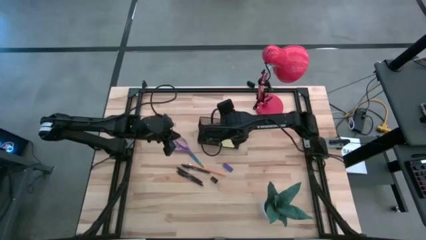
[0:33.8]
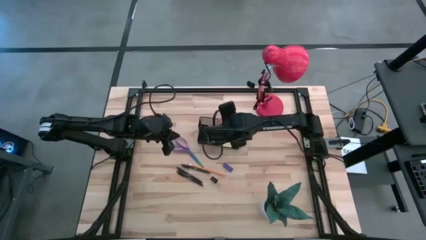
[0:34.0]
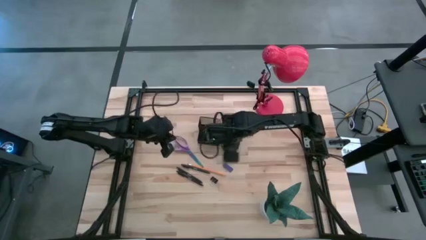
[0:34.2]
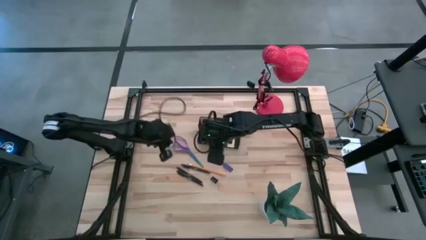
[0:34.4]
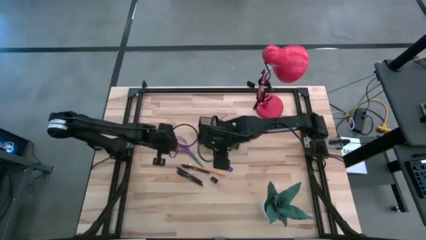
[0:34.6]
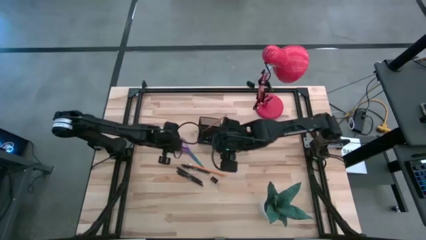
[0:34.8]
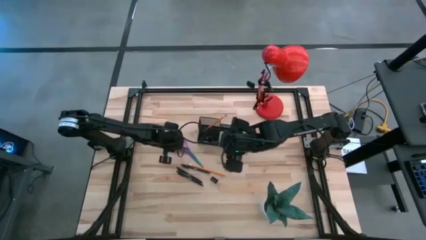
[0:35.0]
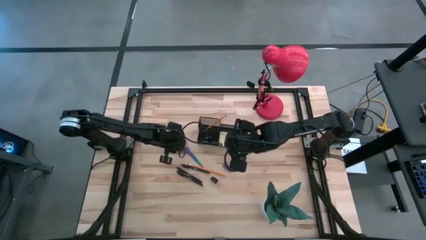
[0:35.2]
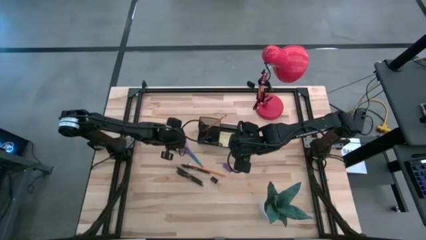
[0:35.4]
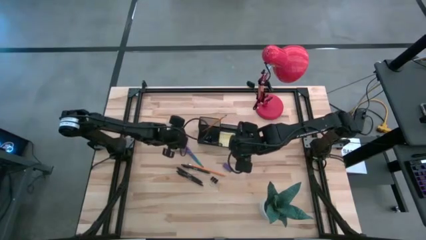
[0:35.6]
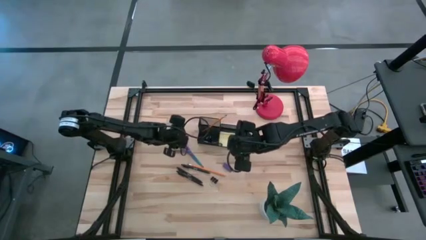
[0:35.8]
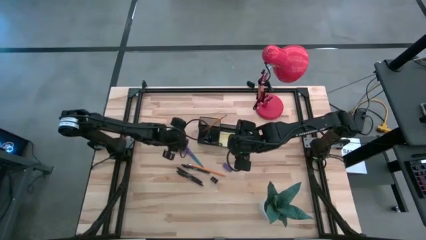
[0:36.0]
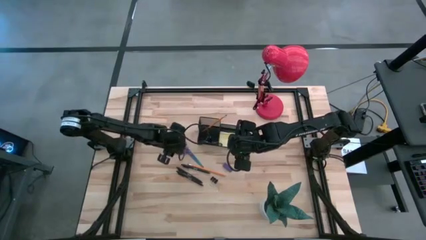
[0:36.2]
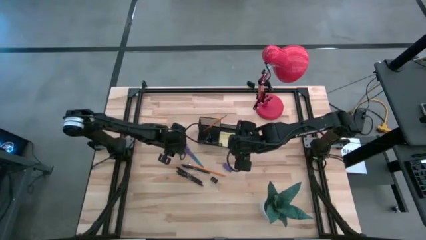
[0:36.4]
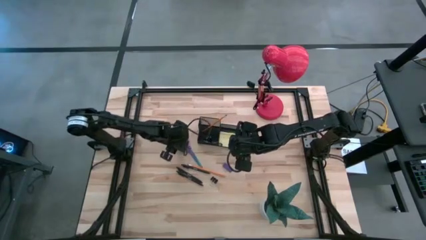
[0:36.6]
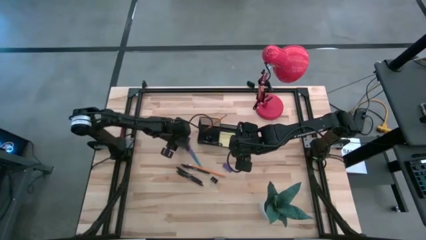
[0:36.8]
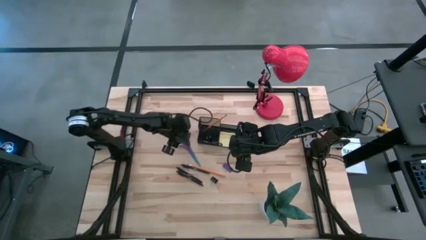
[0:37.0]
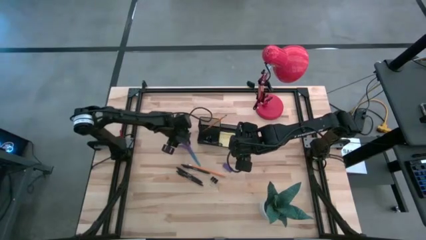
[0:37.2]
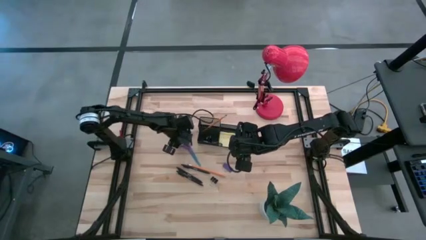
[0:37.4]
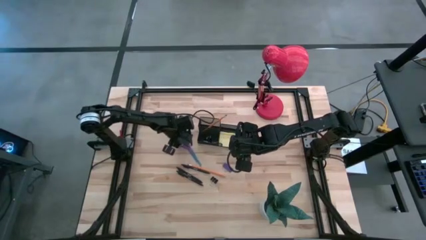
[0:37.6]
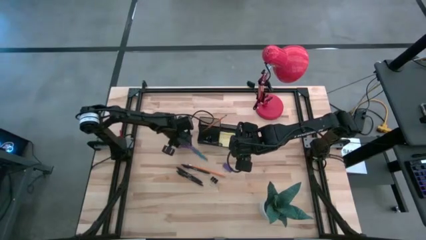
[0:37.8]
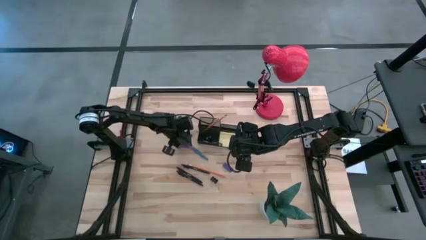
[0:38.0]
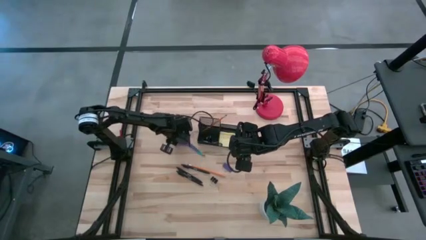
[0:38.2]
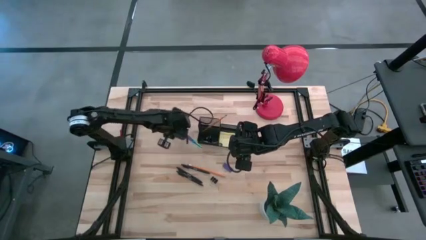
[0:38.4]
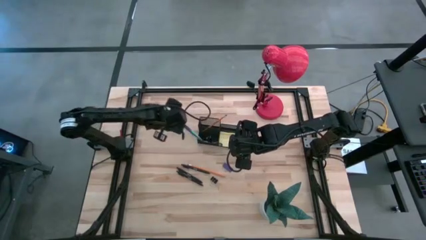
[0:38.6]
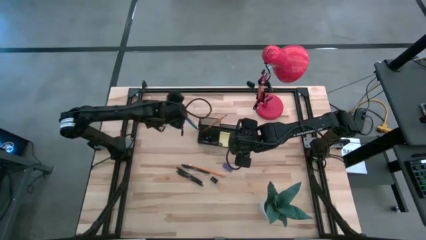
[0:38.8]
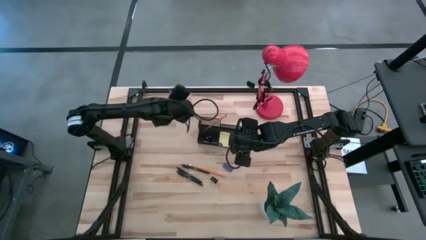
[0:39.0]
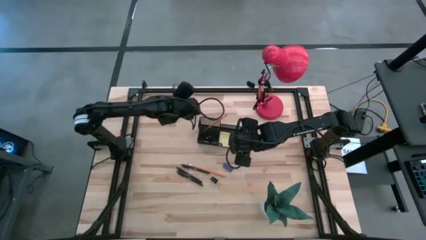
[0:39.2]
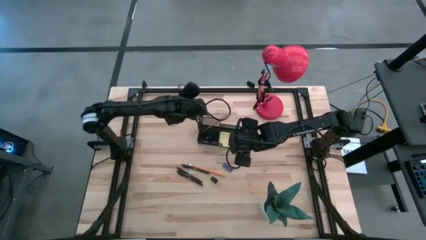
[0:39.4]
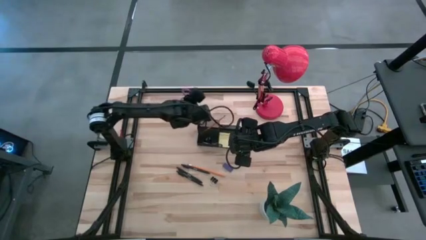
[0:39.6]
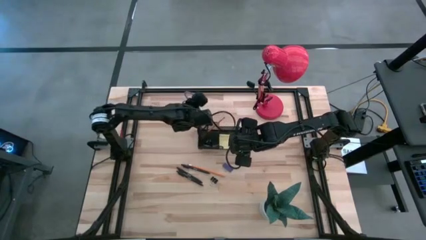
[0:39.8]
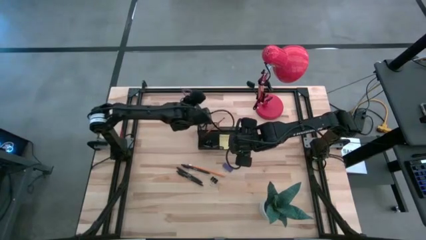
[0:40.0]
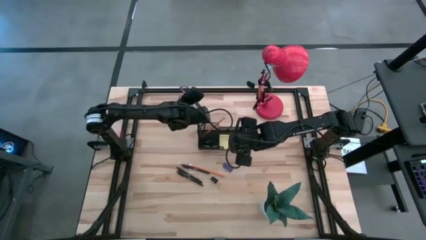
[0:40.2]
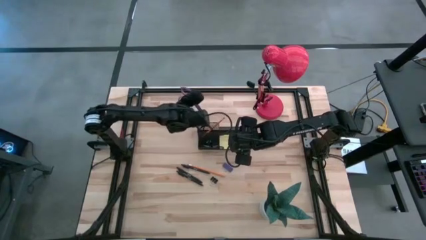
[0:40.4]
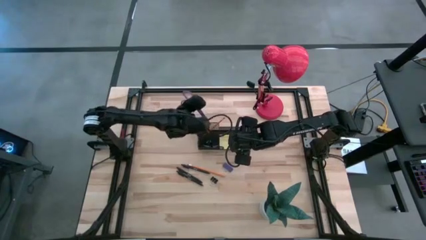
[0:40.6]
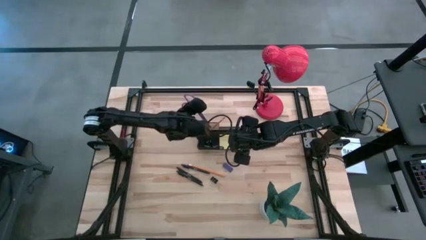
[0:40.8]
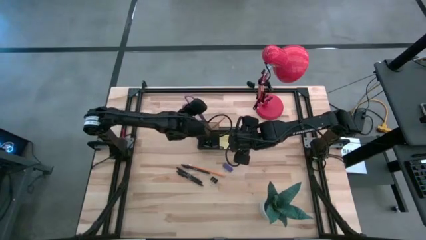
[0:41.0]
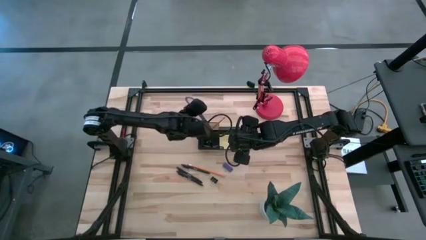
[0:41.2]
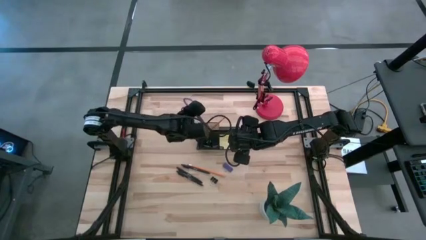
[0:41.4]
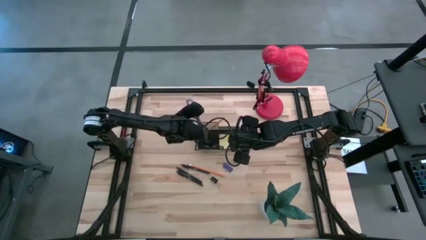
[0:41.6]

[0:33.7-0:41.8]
Task: Pick and place office supplies into organizer
Put the purple scissors into the black desk organizer

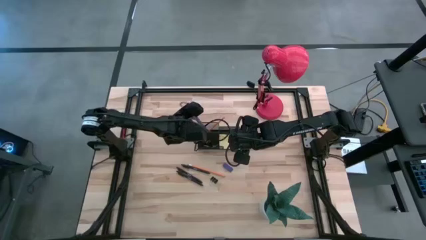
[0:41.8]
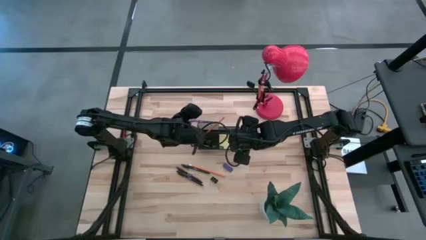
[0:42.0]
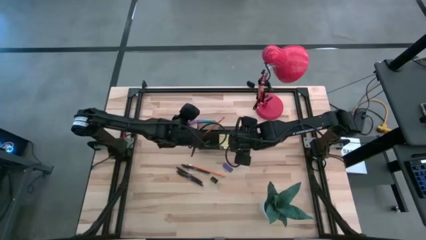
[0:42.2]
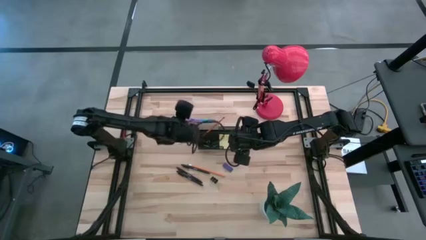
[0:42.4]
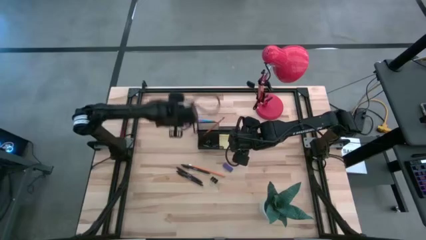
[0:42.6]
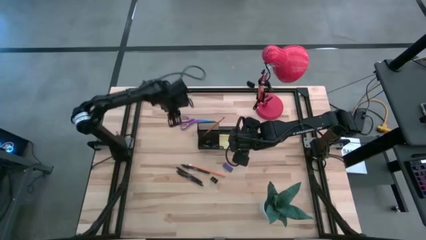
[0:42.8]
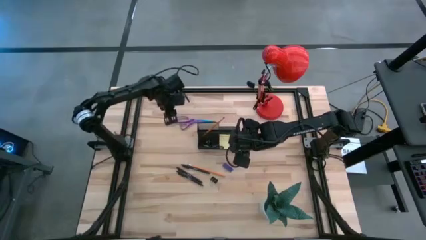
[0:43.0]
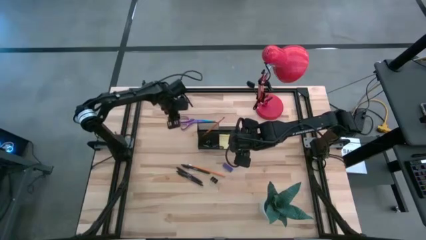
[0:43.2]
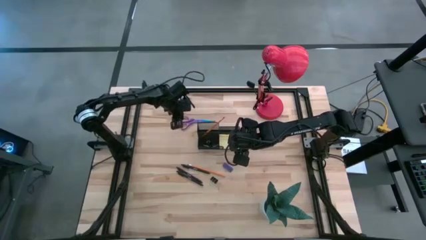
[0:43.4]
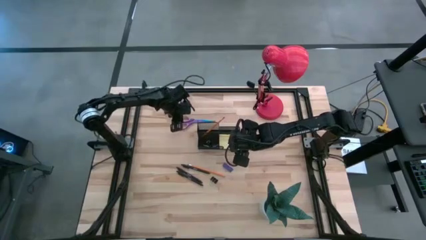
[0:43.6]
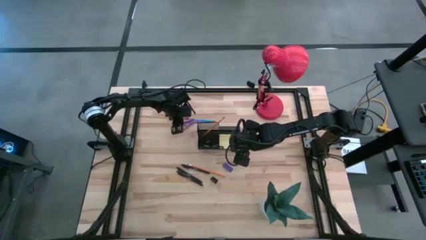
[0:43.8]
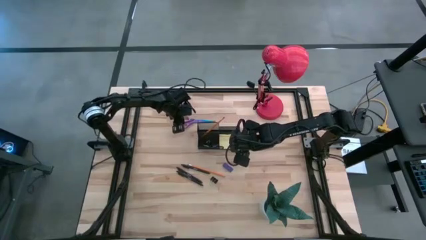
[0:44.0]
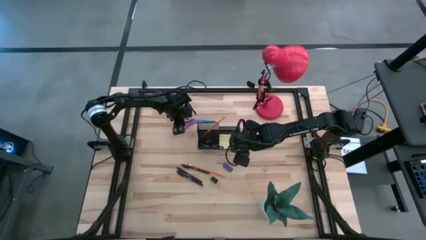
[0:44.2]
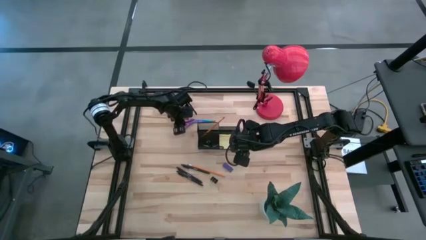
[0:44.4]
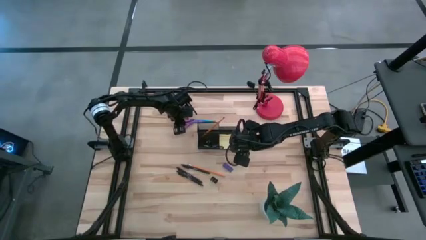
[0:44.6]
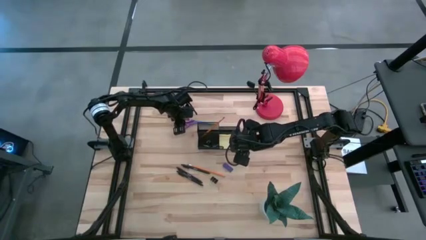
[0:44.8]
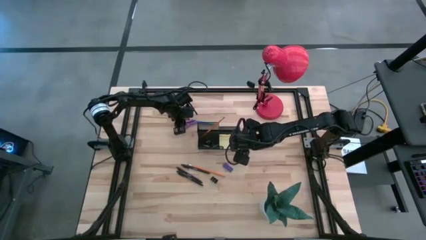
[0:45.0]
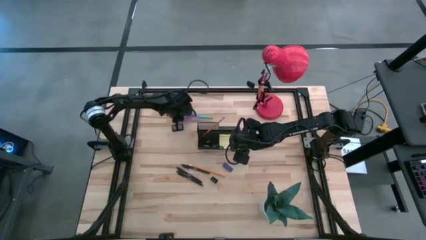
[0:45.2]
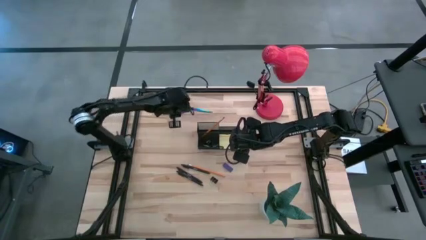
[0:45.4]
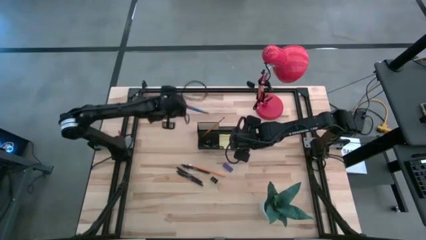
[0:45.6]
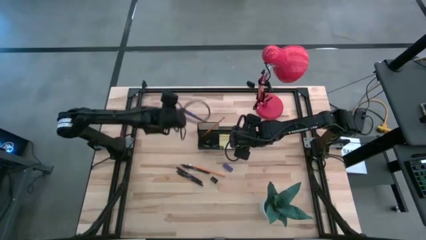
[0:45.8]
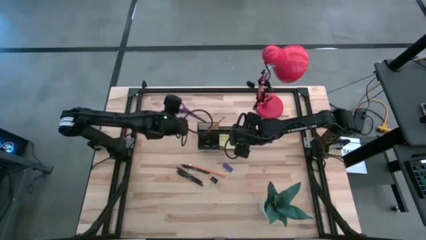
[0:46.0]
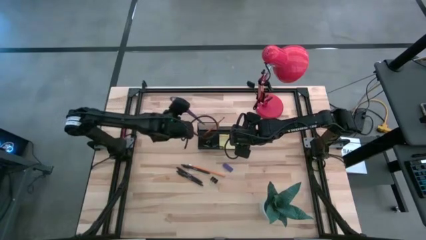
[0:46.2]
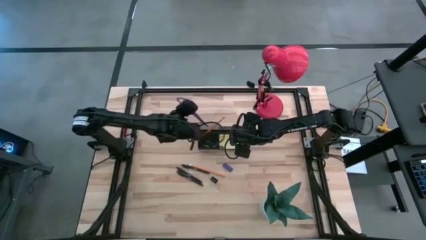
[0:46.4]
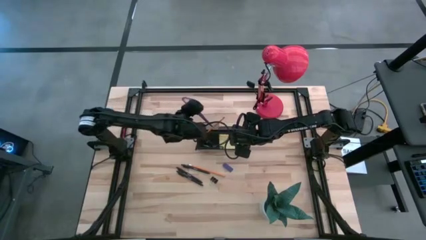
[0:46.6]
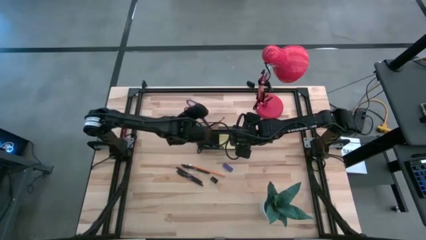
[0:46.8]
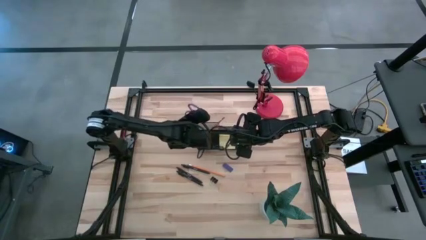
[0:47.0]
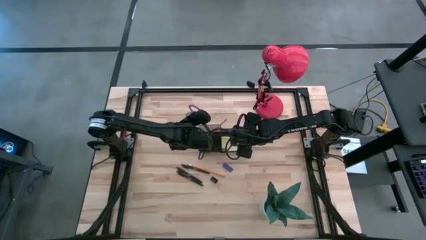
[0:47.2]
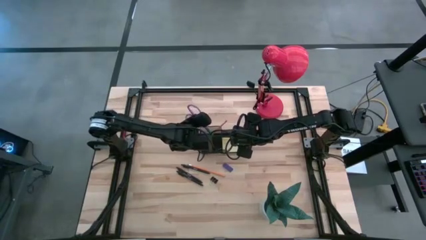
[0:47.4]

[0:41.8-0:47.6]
Put the purple scissors into the black desk organizer

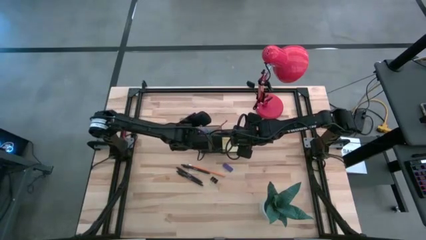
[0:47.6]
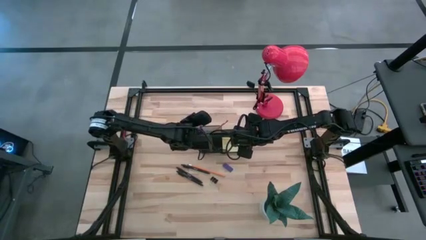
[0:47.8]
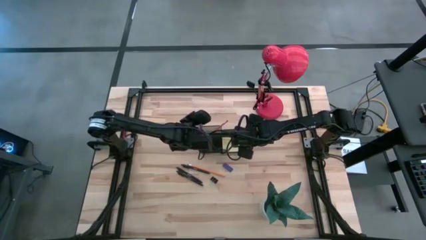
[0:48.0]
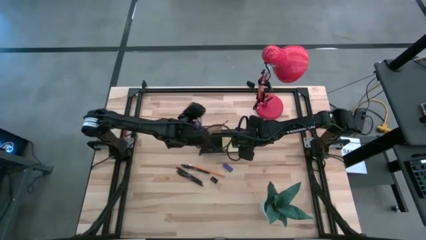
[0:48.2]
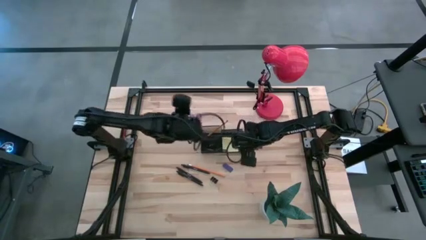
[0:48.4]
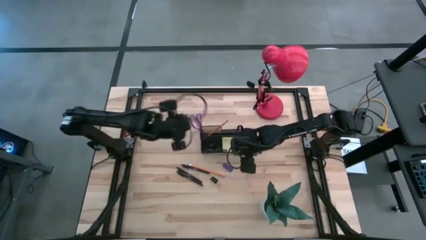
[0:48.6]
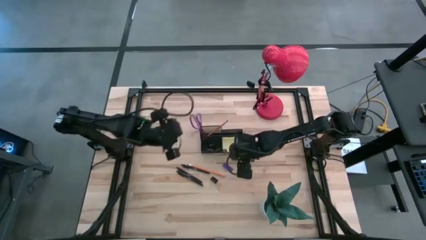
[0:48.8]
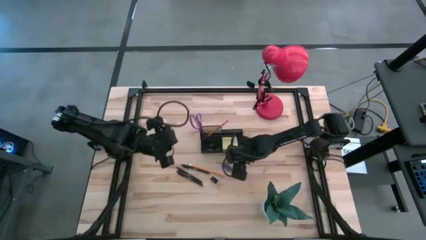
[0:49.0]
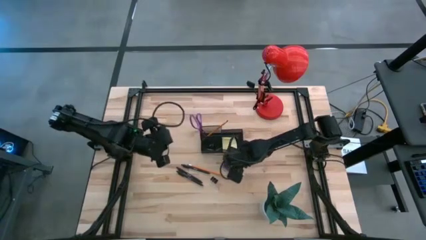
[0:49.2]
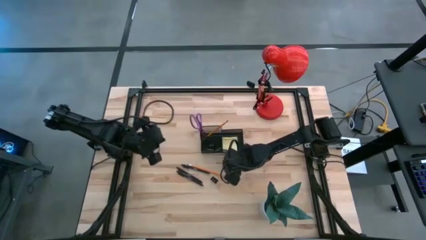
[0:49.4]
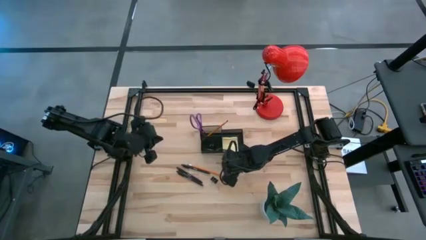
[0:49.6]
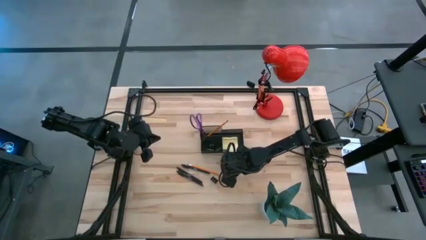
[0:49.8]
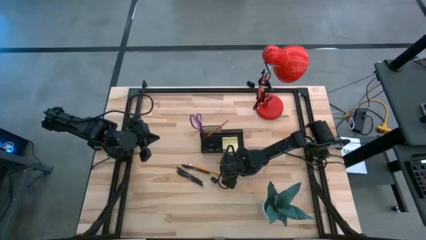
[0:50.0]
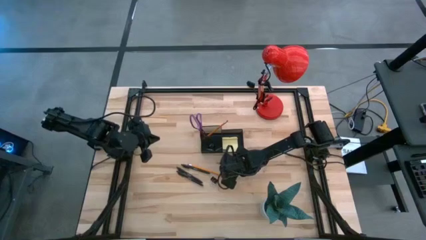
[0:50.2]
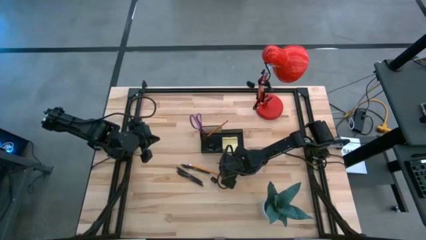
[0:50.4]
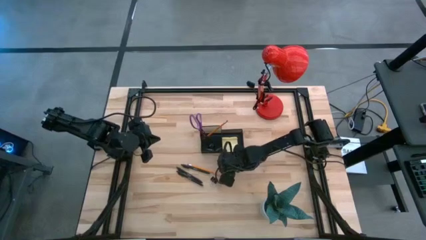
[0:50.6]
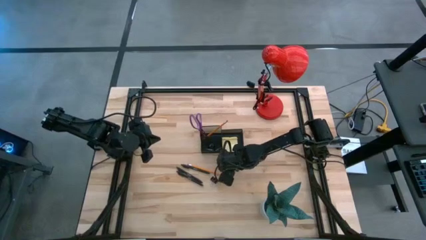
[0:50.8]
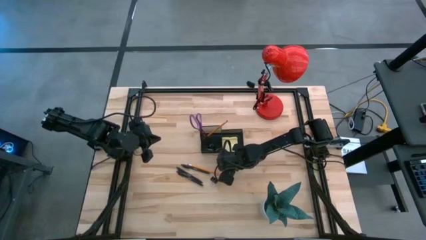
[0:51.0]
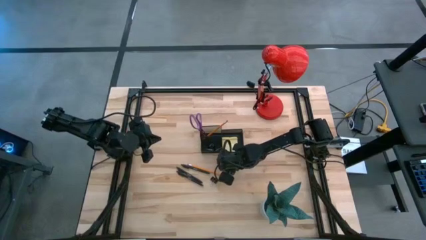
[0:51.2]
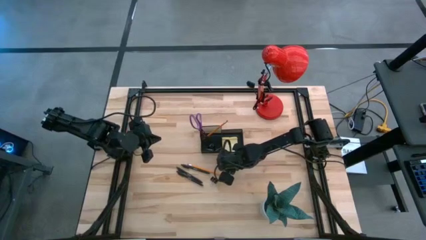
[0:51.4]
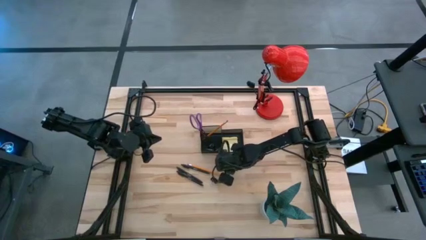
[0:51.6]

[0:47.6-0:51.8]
Put the blue eraser into the black desk organizer
